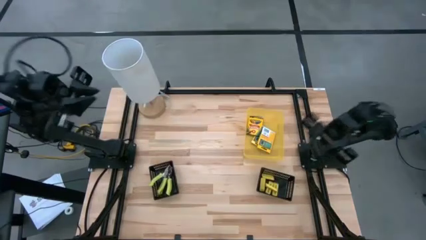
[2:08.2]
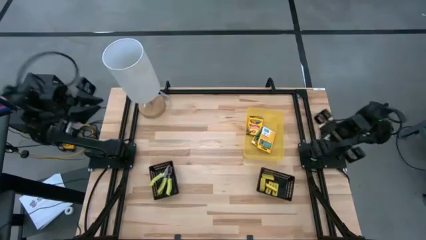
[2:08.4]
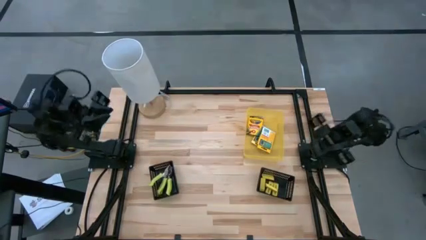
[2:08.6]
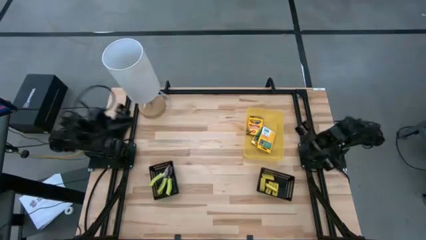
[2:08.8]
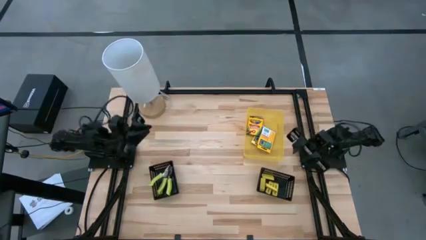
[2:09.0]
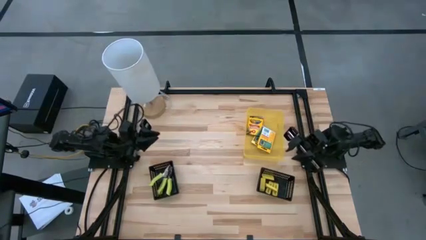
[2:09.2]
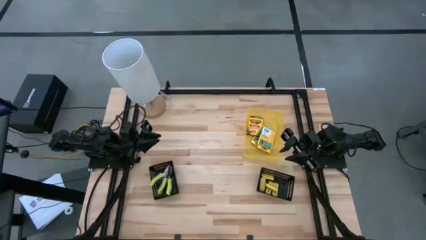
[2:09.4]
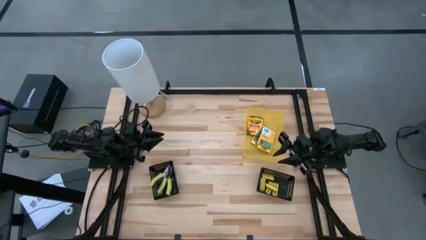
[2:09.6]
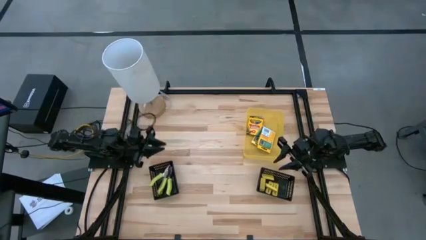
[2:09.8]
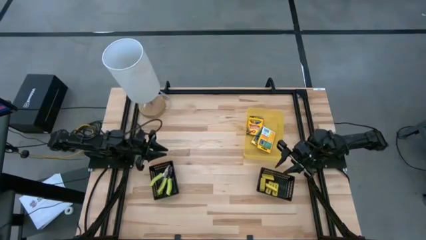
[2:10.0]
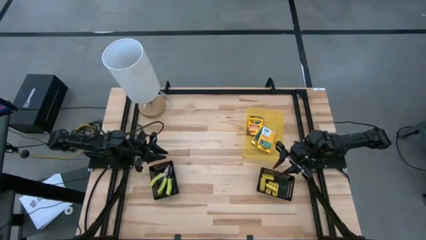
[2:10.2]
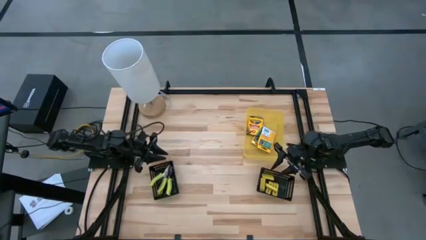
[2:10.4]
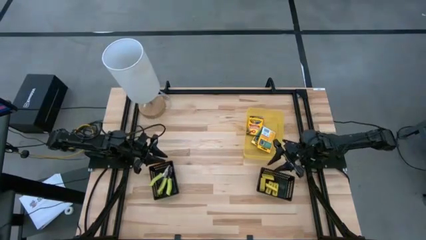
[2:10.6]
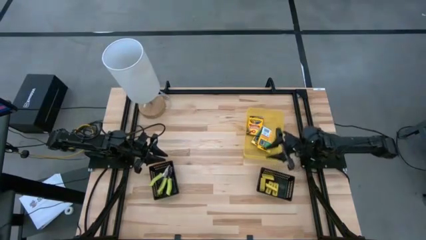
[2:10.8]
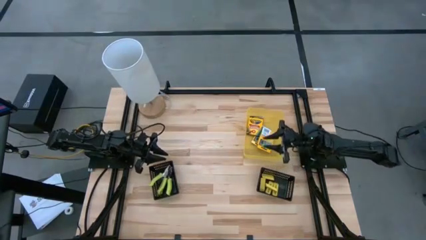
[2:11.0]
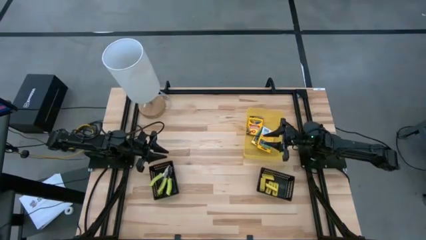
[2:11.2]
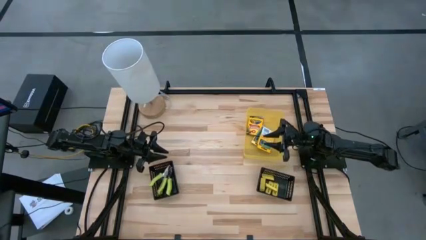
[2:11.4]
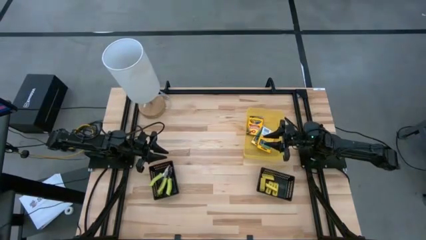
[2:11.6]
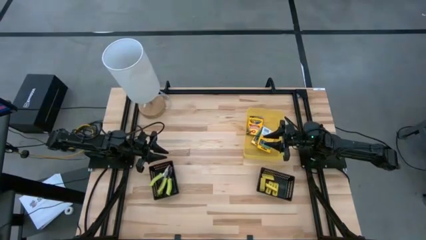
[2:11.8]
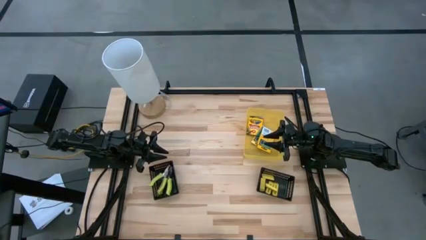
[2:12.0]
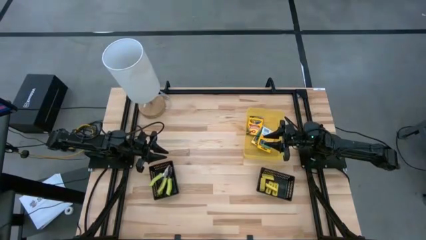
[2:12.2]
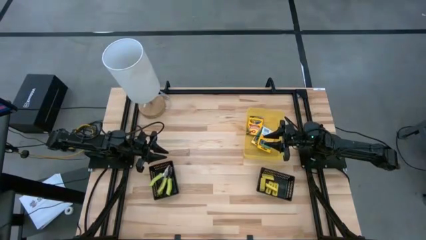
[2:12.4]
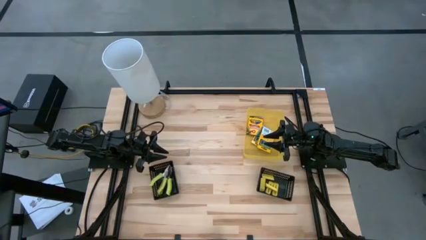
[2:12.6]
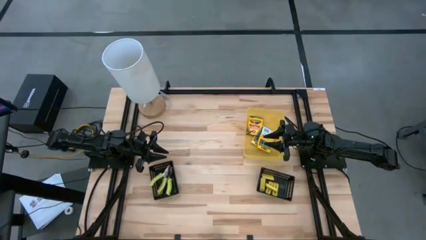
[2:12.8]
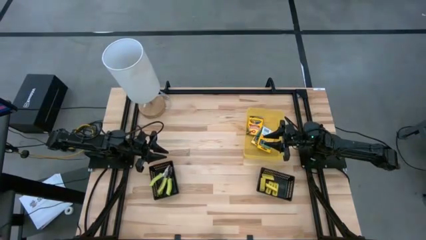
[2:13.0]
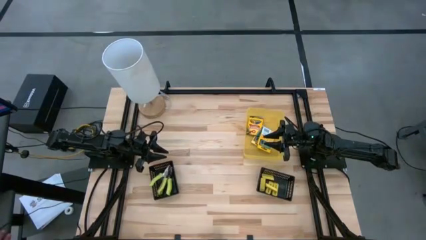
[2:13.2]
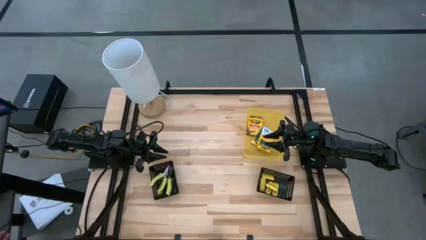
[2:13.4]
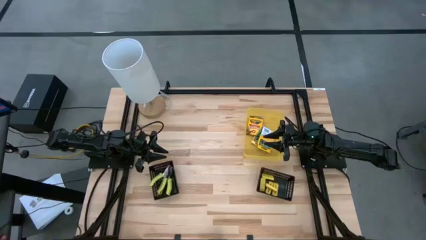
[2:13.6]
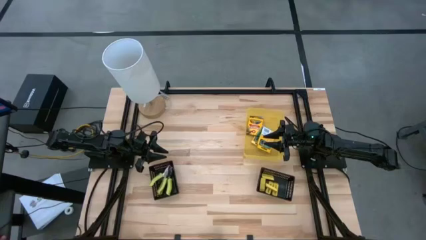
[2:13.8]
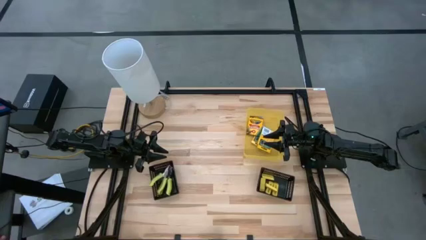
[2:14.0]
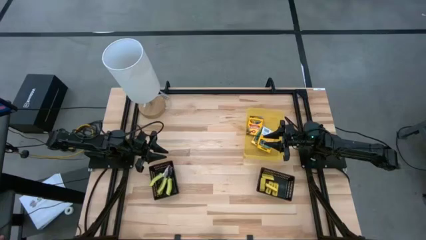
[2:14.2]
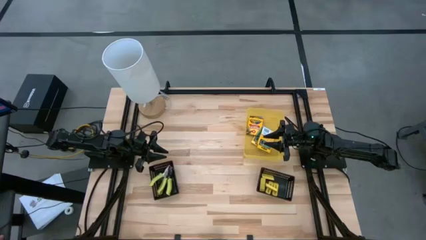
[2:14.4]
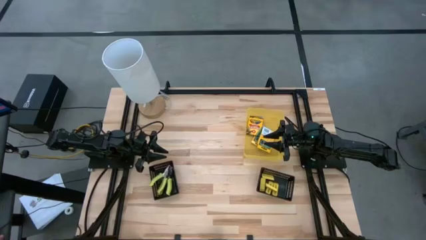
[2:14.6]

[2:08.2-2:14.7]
Task: Pick & Place School Supplies
Return to Home Position

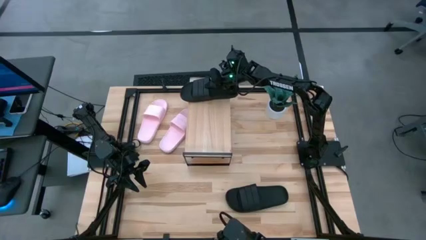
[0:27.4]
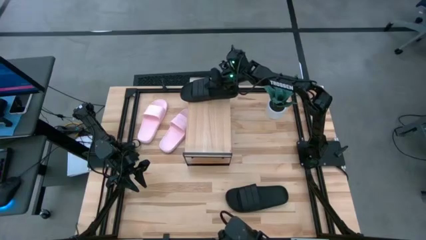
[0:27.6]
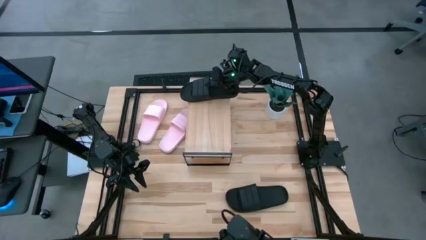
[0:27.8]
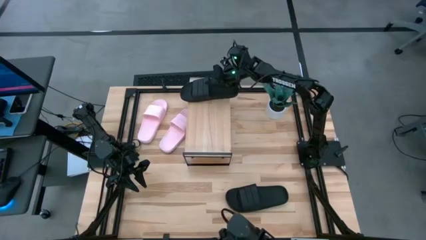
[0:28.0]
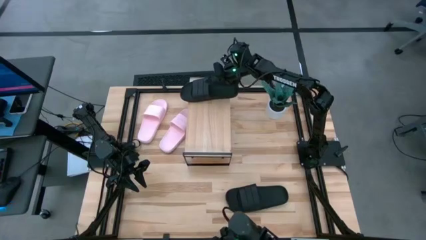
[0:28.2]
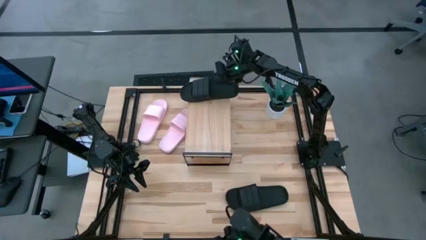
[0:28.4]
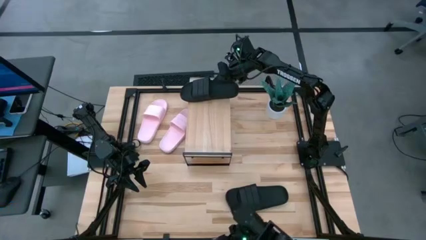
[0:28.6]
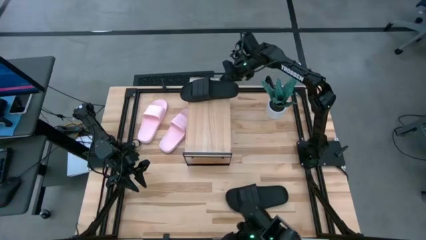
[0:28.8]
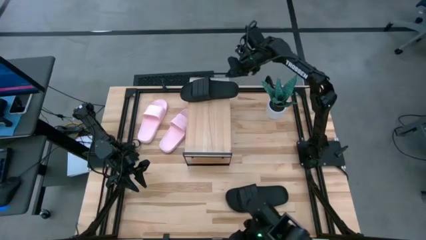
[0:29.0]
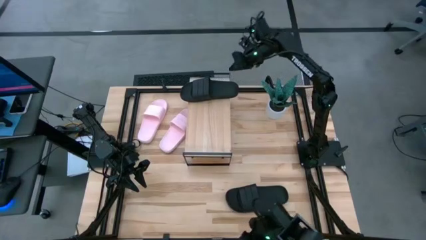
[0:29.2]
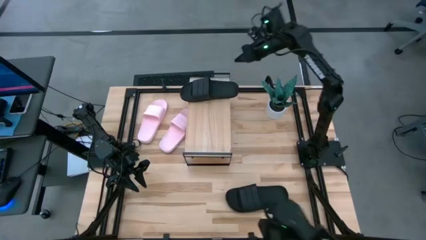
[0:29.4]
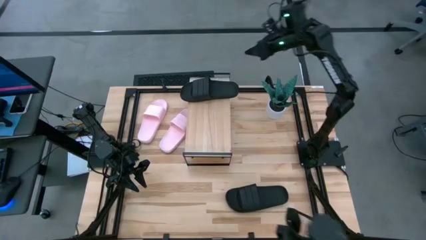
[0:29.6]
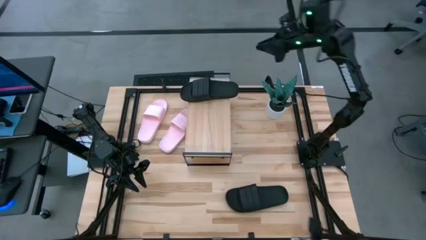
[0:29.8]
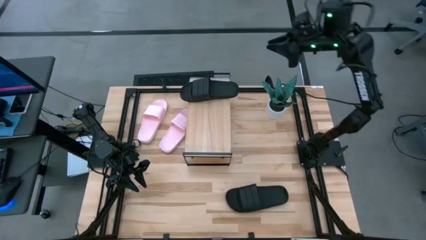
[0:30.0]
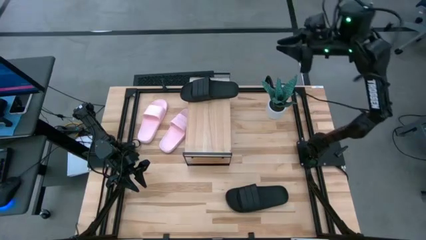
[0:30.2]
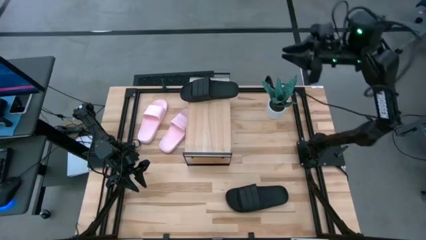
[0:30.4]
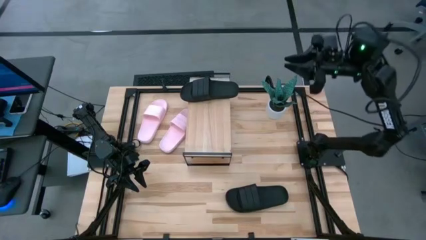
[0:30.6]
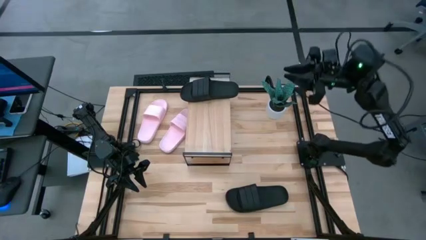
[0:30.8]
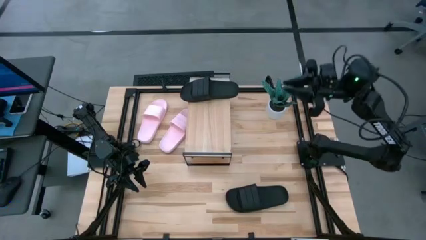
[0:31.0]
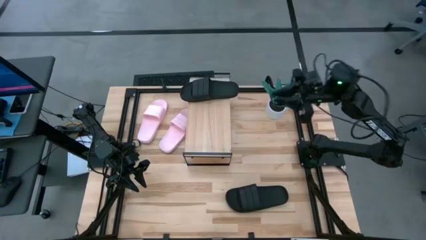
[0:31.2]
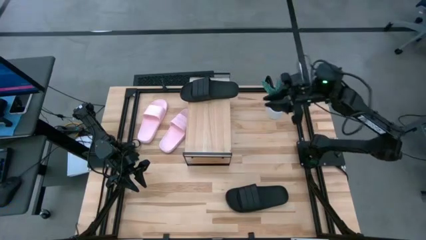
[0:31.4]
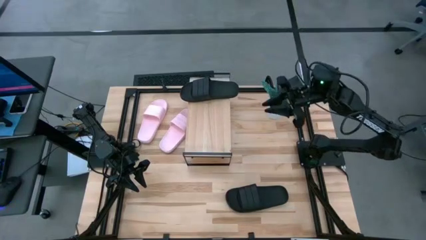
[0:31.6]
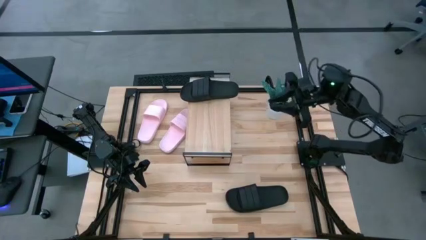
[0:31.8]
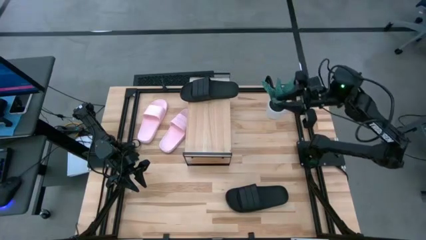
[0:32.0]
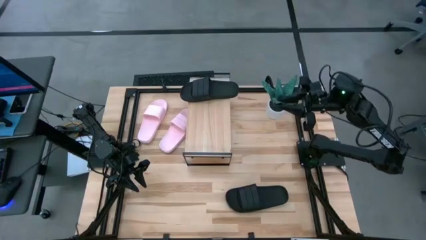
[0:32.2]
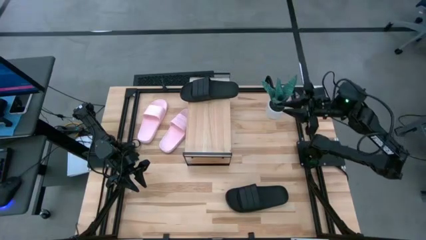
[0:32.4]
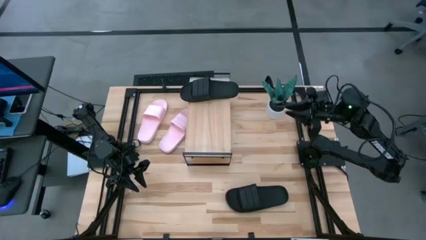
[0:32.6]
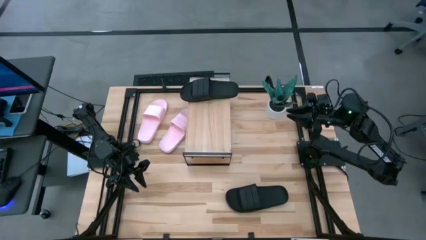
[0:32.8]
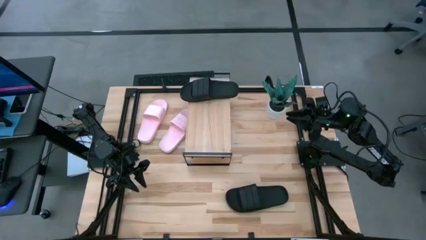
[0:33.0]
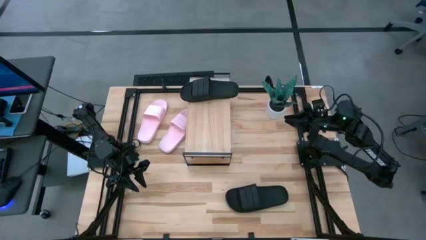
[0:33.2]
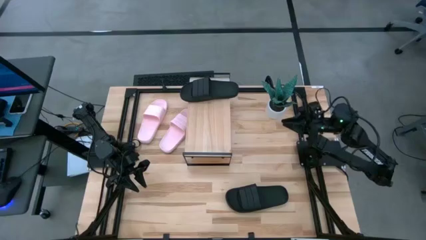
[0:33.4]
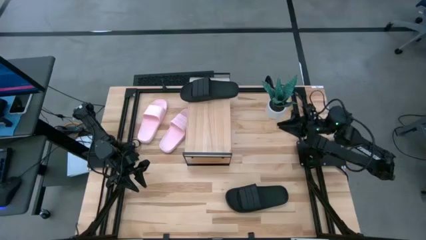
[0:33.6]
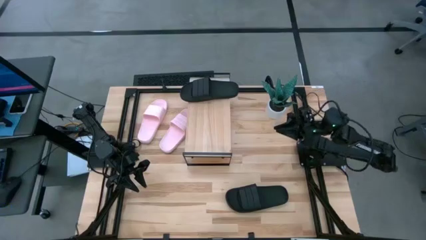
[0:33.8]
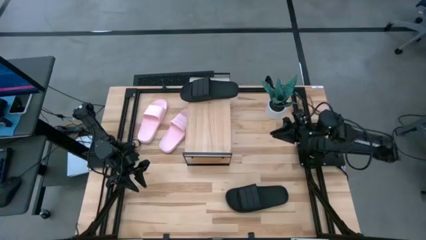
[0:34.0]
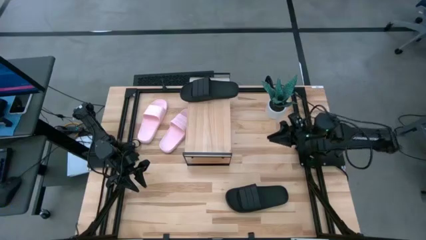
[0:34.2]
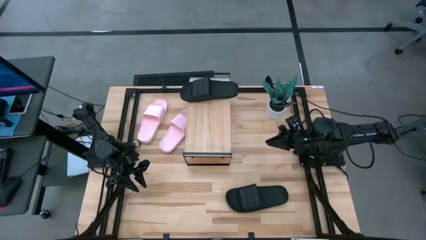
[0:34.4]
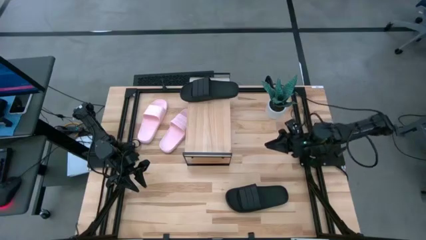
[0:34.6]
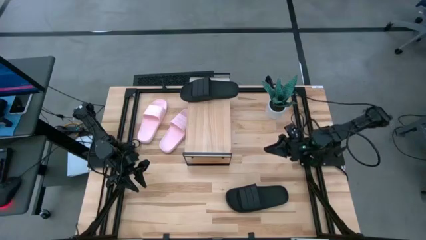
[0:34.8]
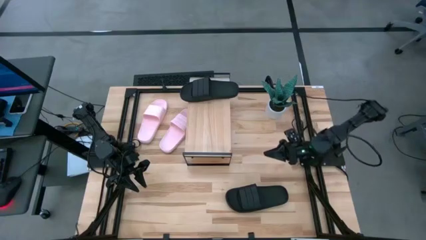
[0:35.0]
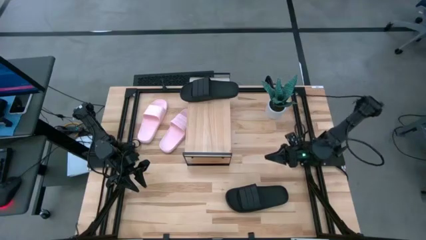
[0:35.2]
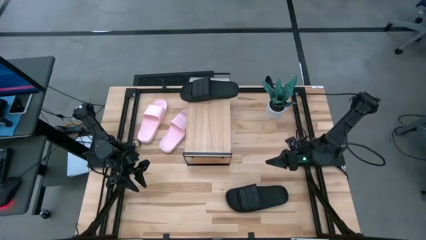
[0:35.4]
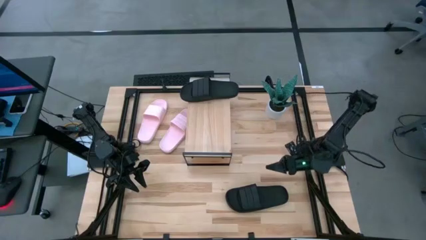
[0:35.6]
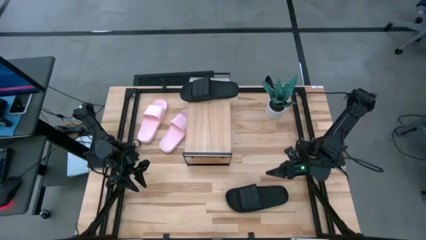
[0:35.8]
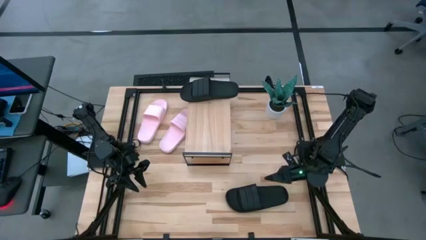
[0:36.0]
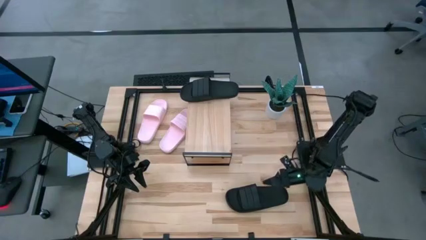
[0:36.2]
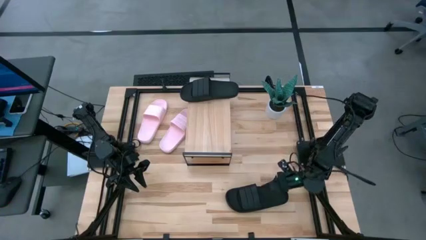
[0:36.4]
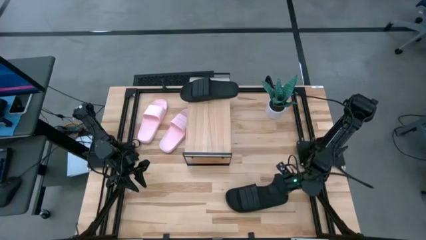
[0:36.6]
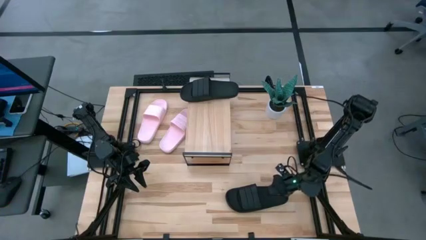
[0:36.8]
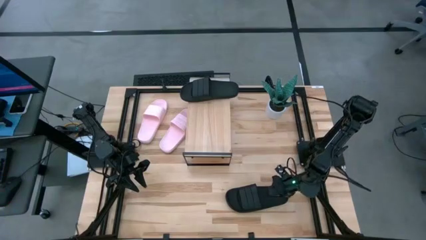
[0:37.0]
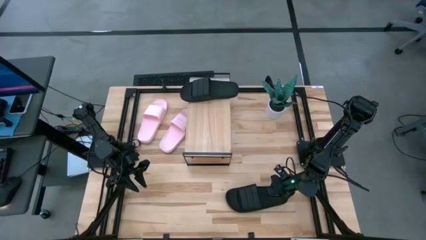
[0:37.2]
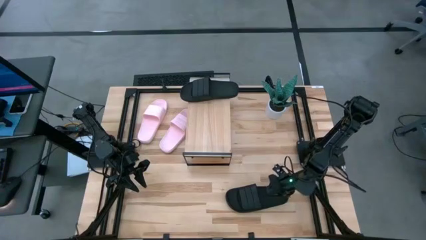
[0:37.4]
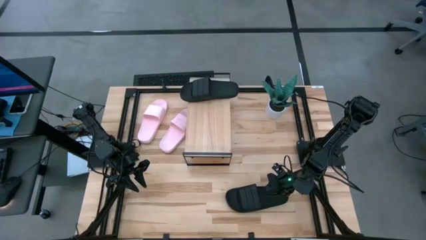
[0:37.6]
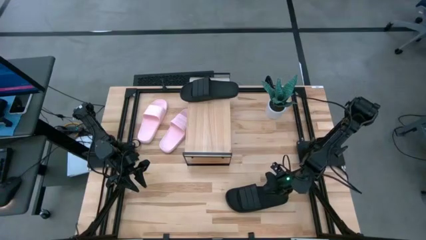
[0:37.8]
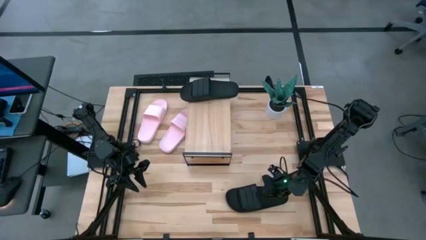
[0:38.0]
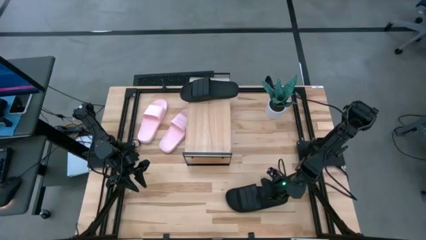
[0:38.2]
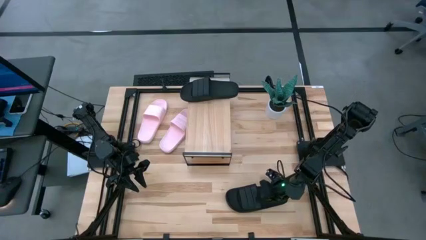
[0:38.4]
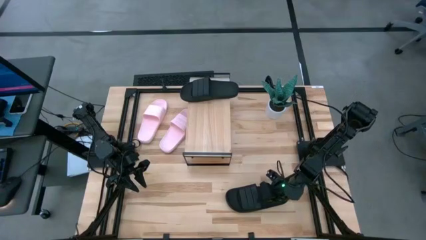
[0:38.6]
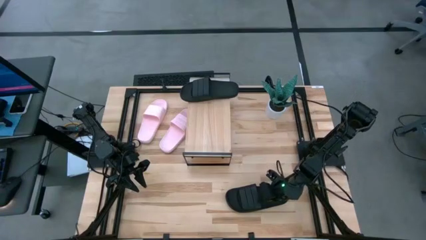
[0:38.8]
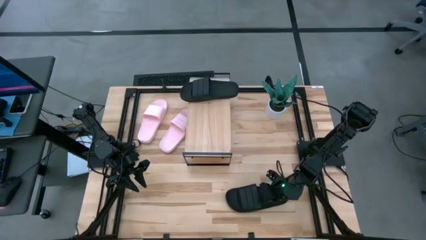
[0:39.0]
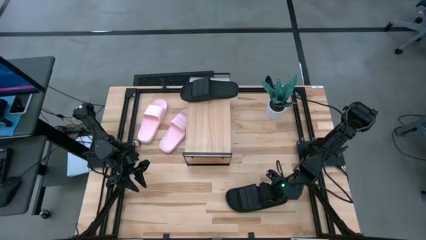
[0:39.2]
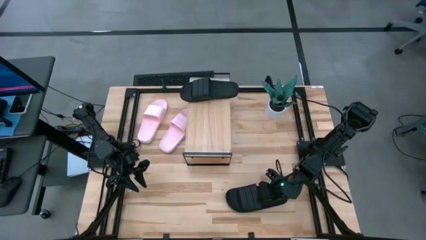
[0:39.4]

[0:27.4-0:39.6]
Task: Pick and place slides into the shelf
Put the black slide on the shelf
